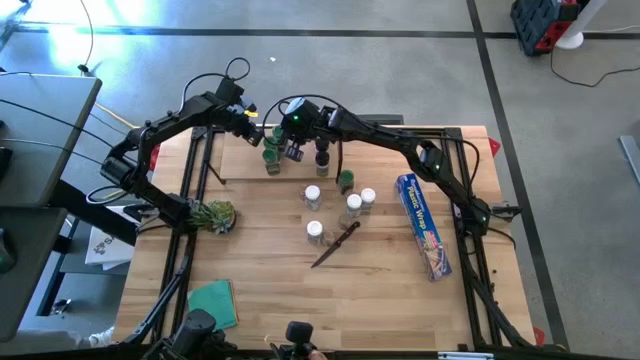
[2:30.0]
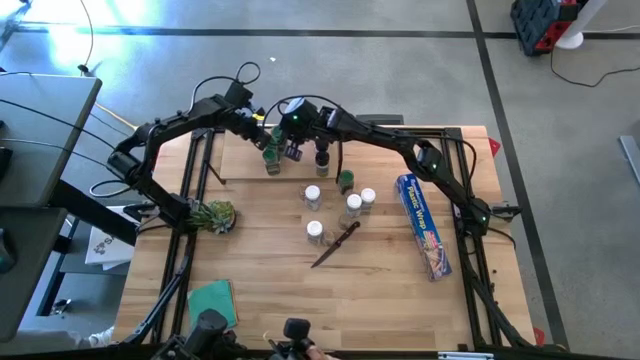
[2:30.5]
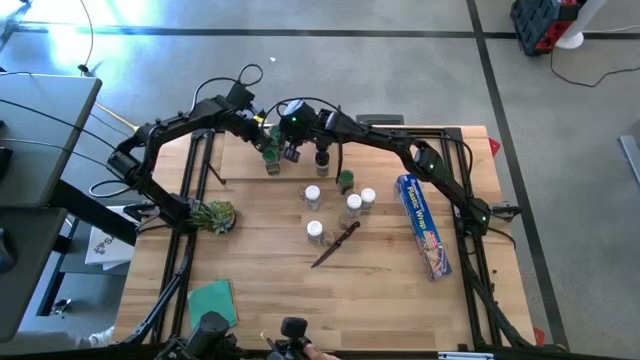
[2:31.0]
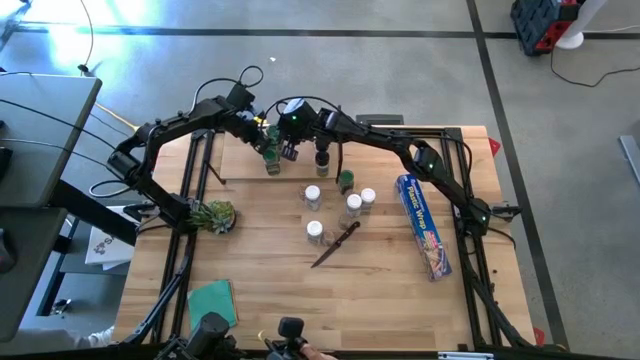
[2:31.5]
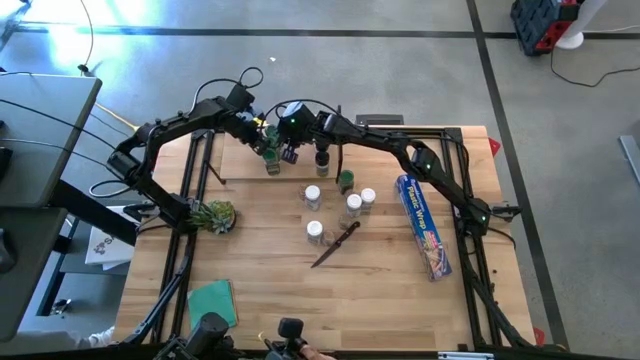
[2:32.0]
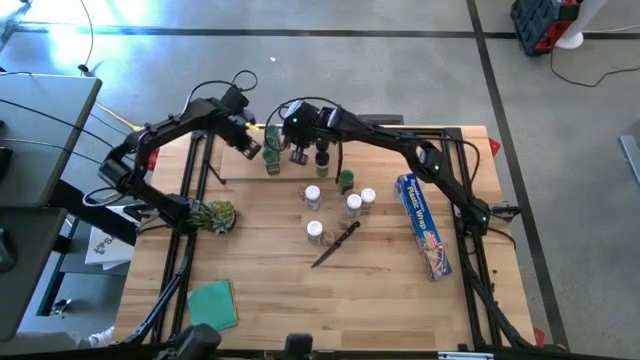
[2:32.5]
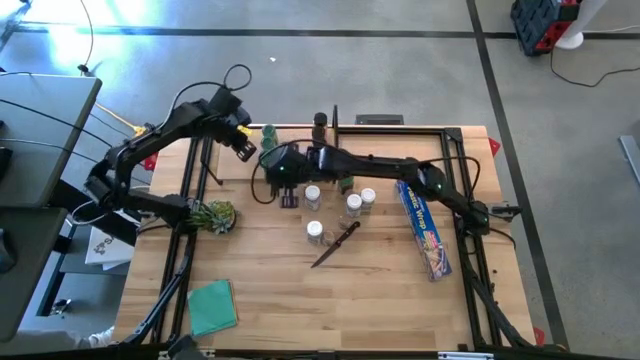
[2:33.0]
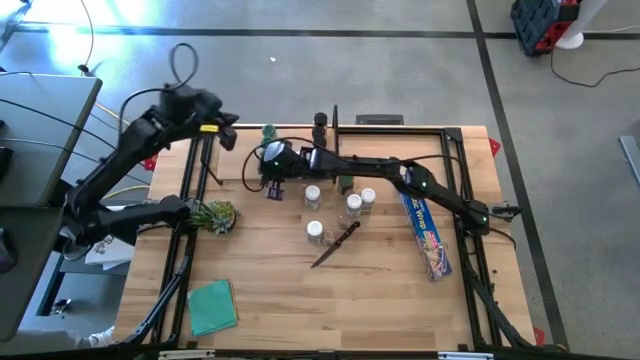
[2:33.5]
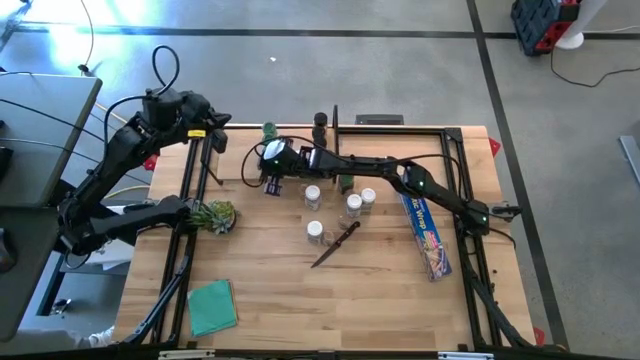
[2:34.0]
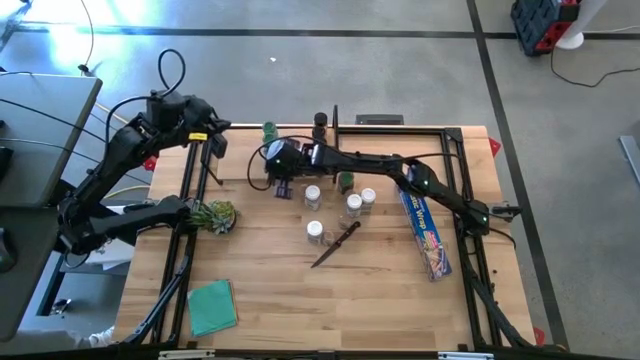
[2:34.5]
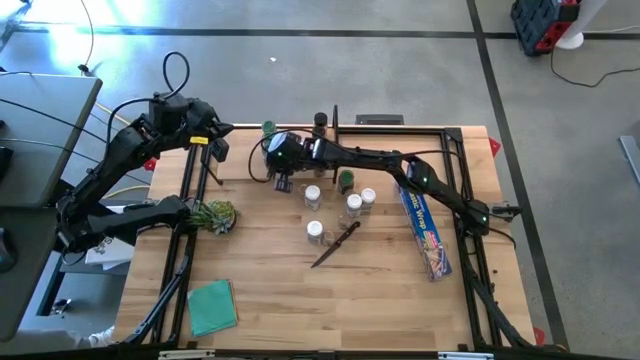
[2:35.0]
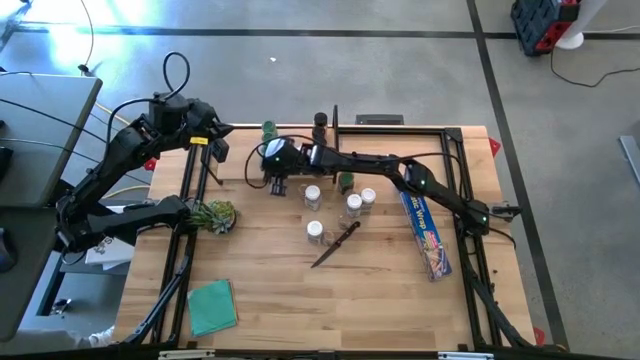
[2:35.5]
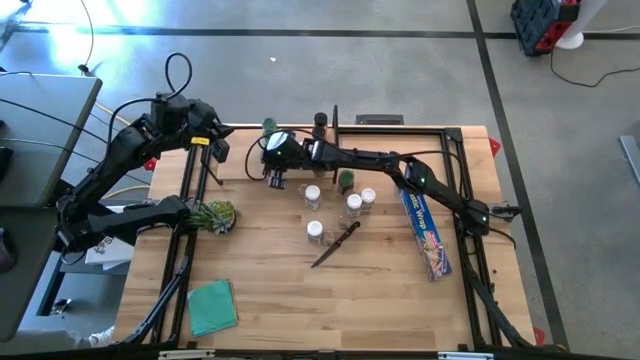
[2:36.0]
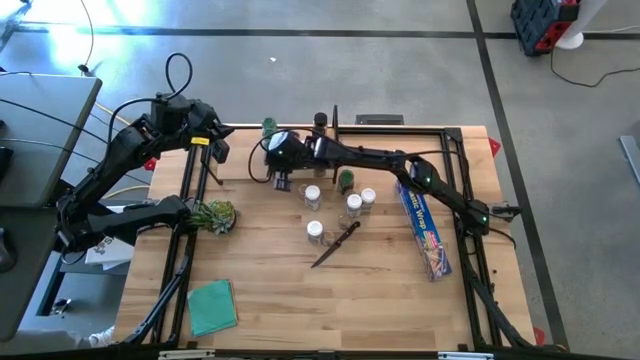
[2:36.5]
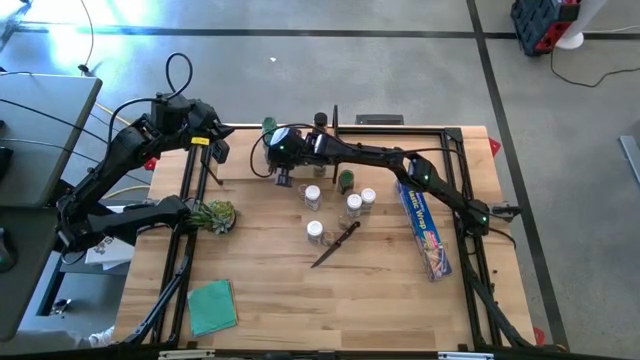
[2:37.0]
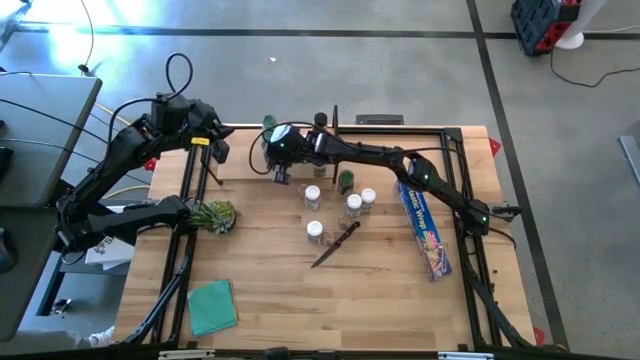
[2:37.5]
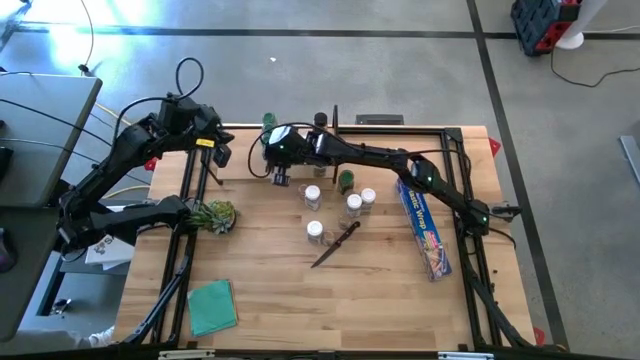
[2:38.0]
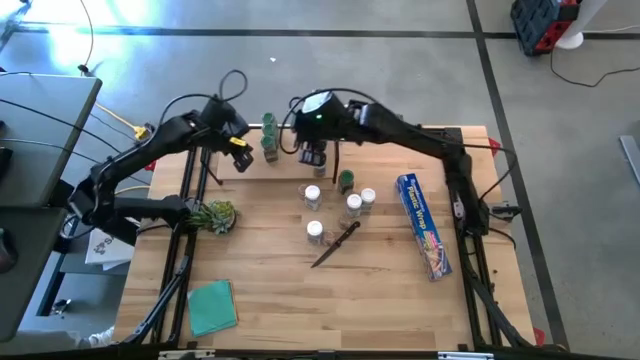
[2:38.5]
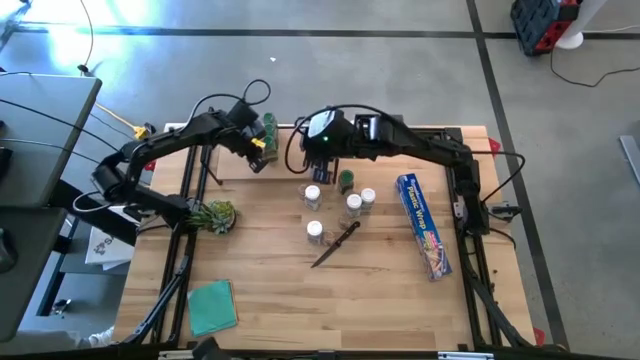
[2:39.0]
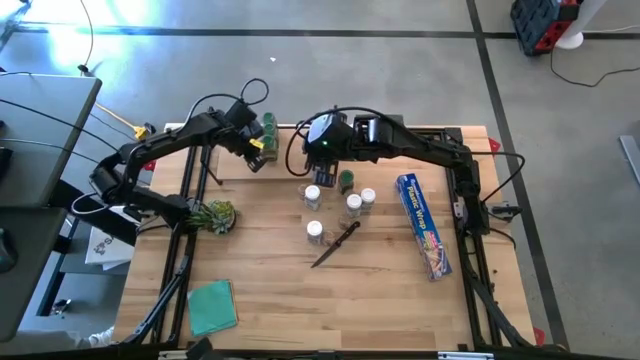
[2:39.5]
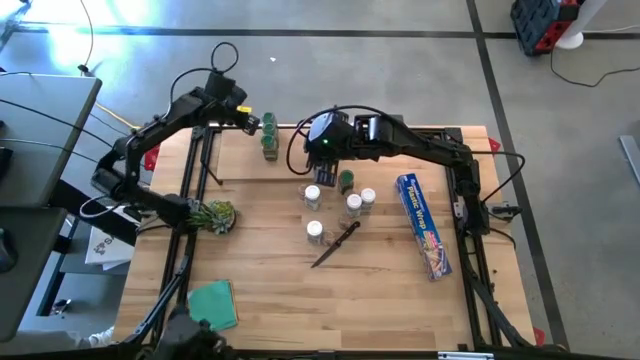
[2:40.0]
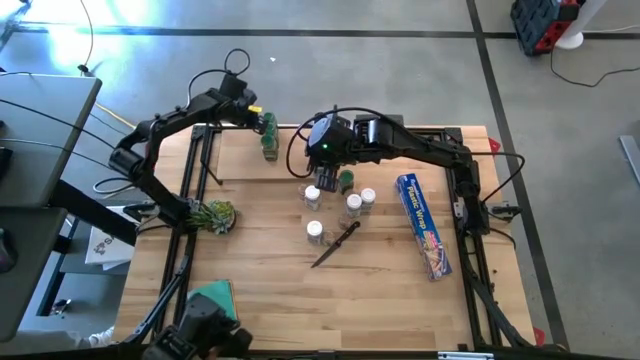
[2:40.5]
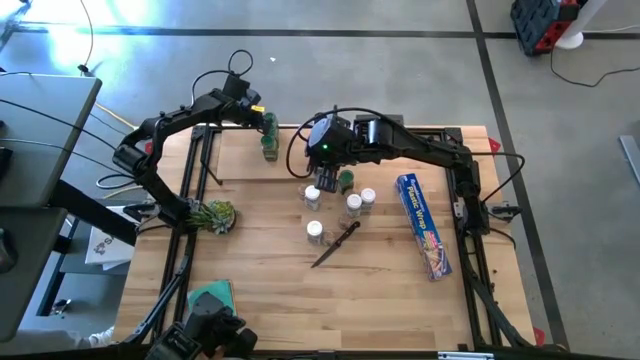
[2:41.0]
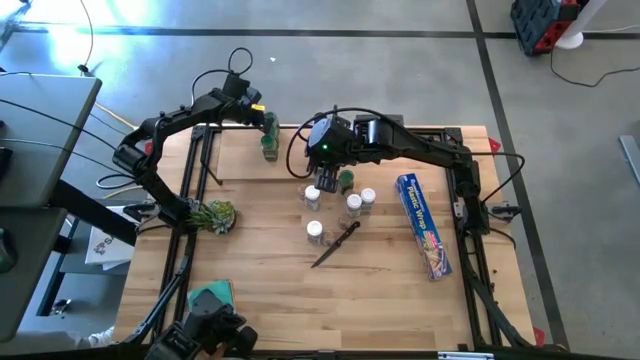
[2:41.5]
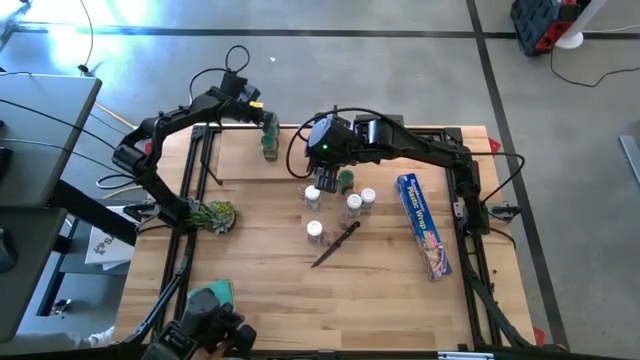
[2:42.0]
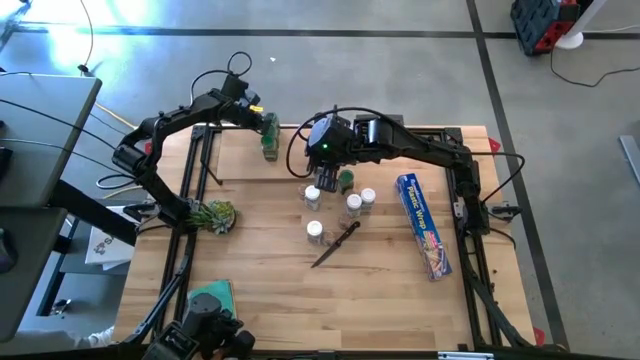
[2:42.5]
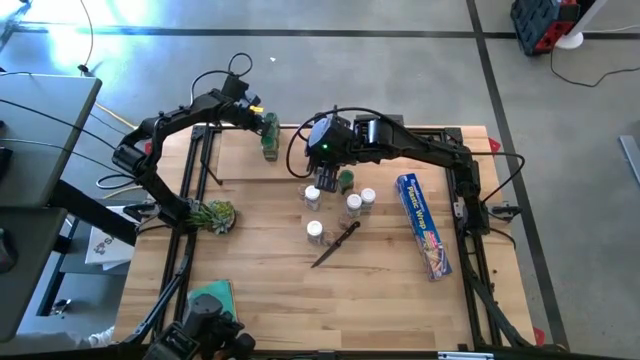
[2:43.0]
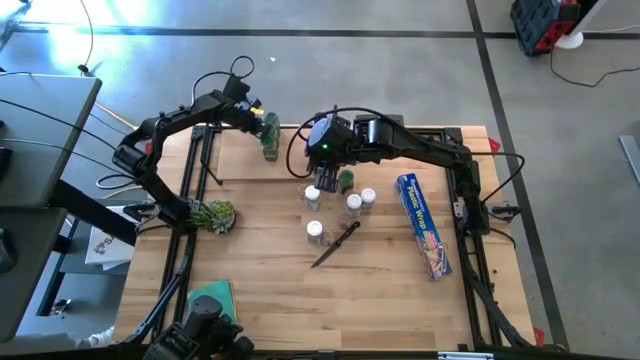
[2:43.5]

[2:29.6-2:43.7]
Task: Shelf spices
Adjust the black and green lid seasoning bottles on the shelf
